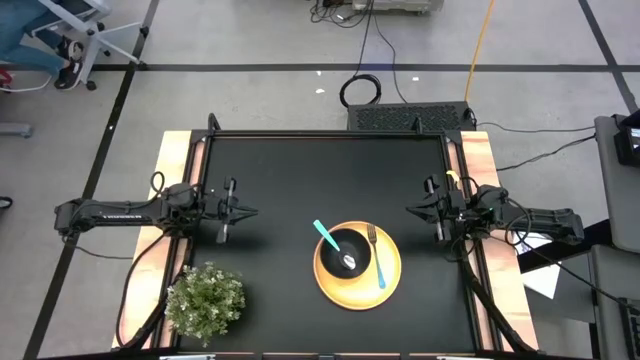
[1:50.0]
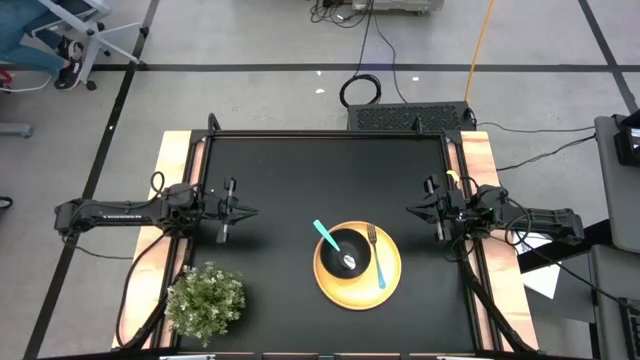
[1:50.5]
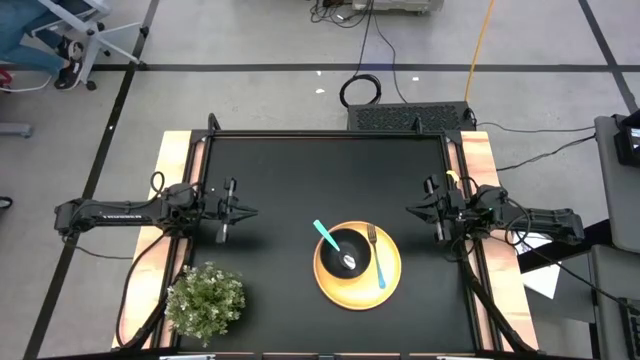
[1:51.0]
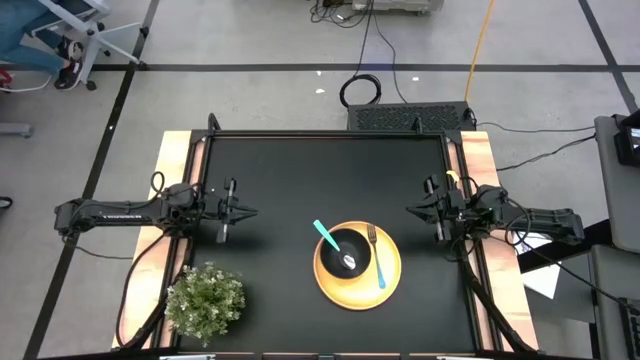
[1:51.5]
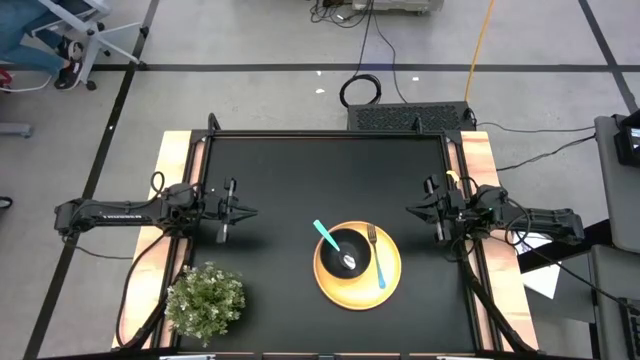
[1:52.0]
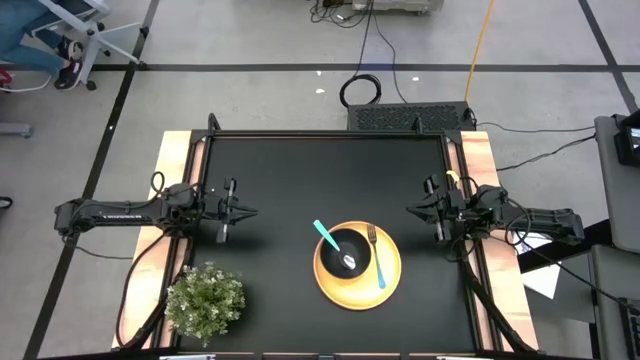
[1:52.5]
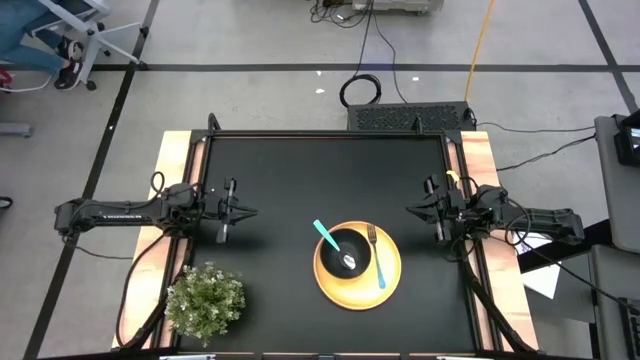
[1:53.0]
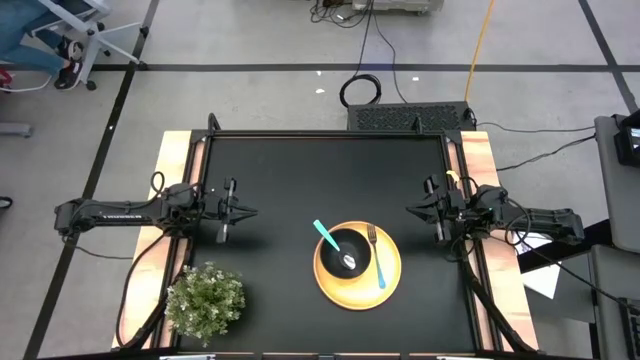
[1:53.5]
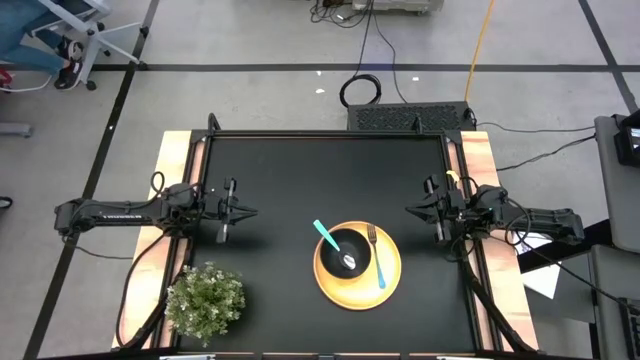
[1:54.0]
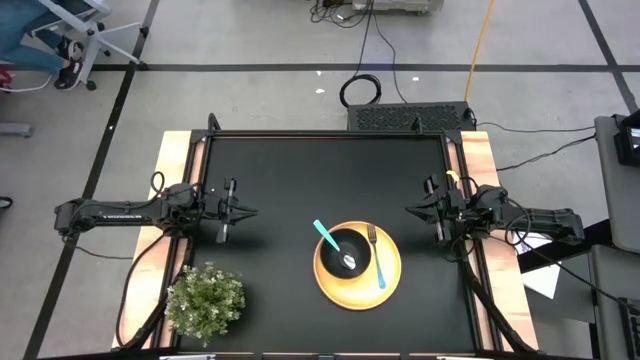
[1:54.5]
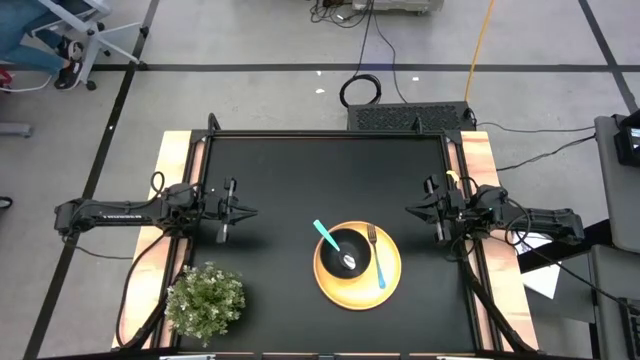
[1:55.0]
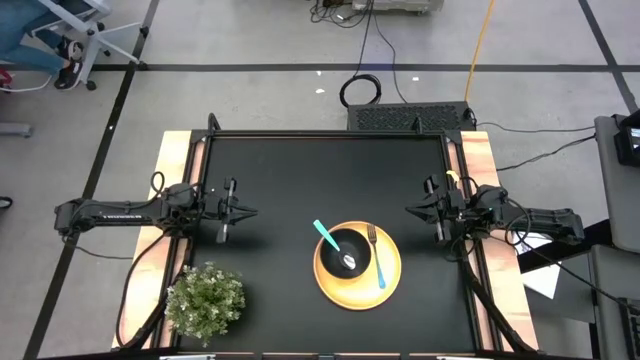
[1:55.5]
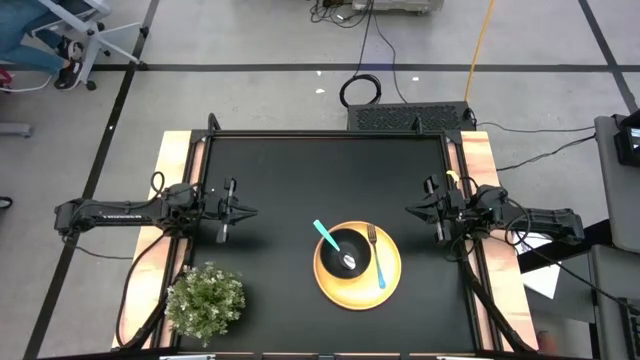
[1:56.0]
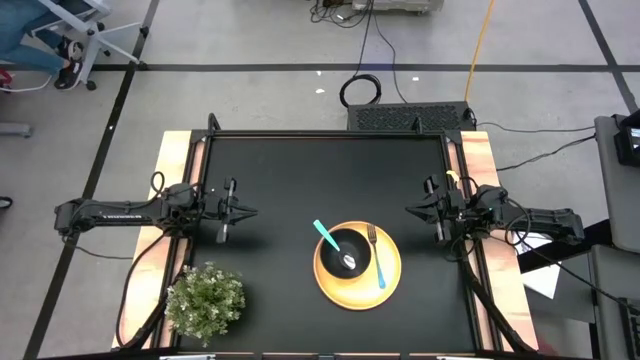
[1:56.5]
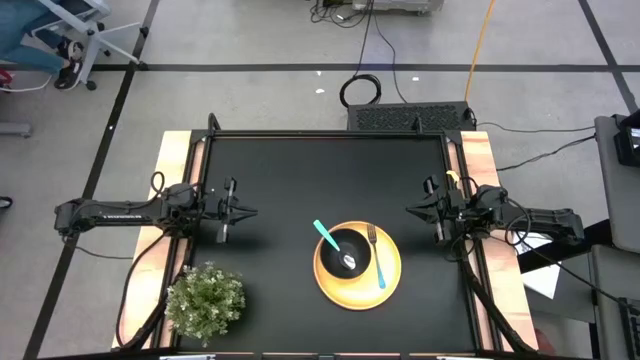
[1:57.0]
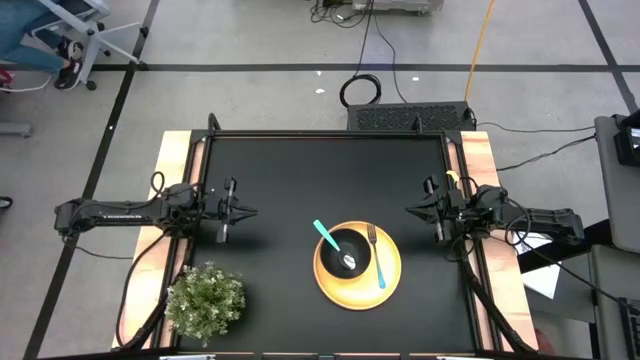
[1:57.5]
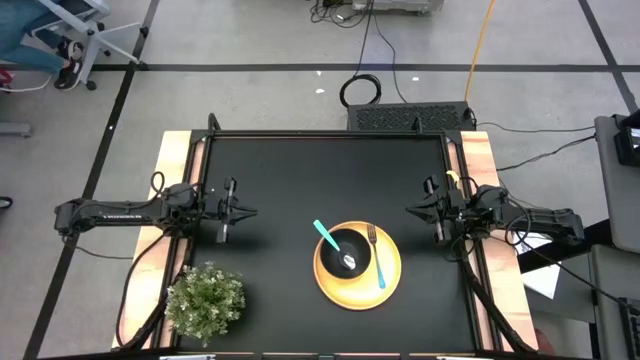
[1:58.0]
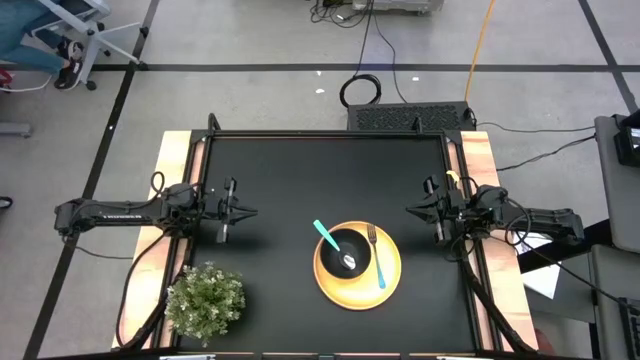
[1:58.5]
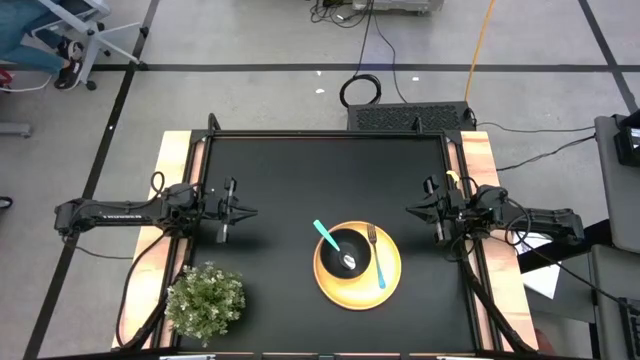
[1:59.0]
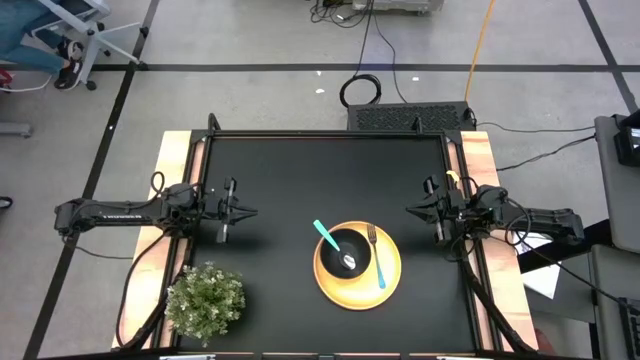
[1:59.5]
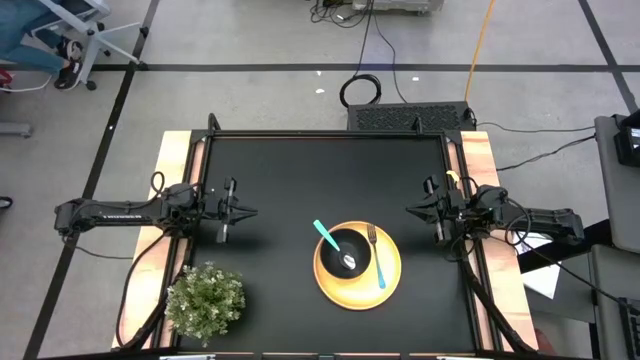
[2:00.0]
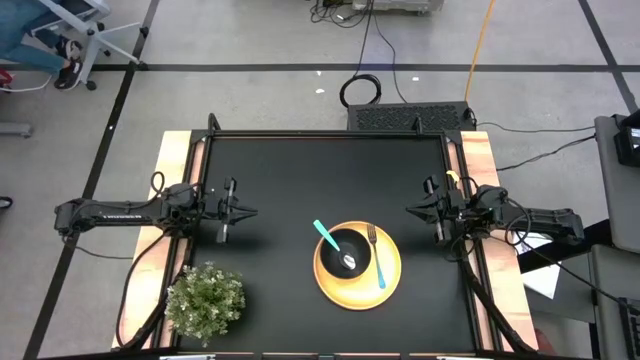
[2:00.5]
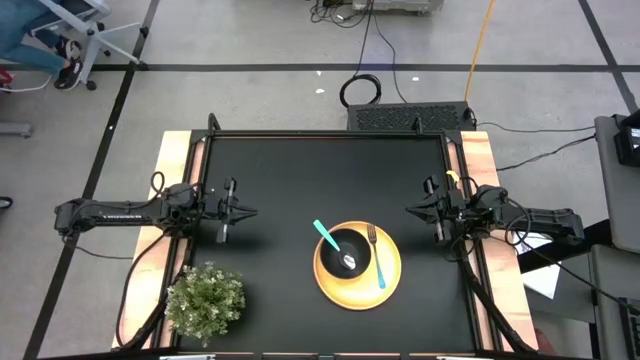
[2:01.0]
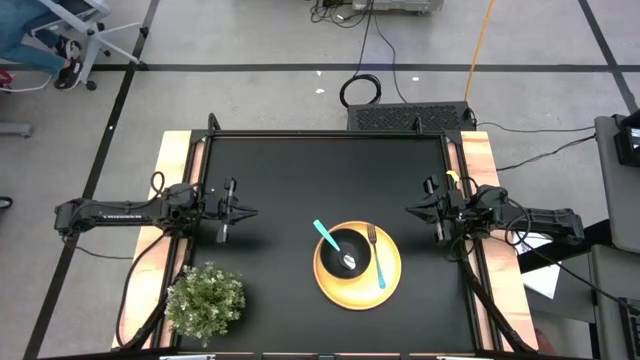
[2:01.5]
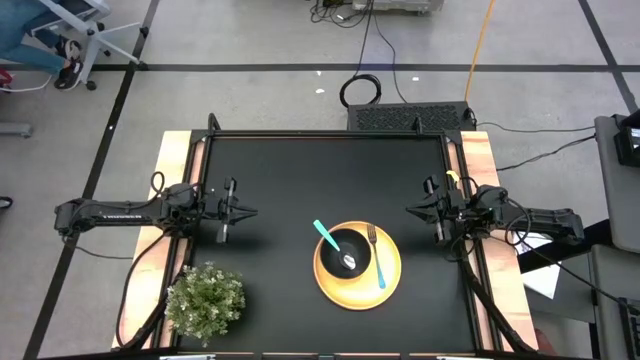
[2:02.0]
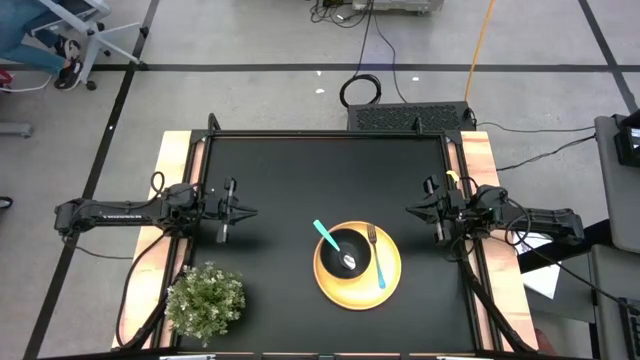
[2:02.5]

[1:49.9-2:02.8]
Task: Set table place
Return to Home Position

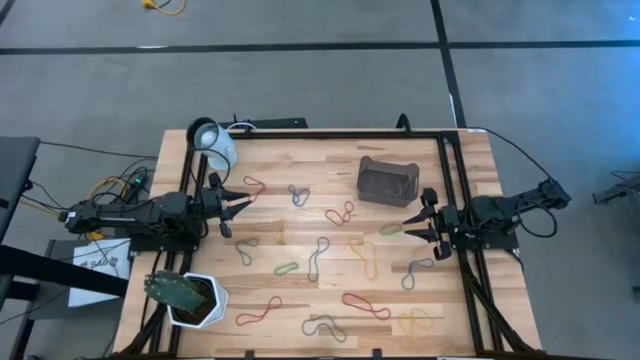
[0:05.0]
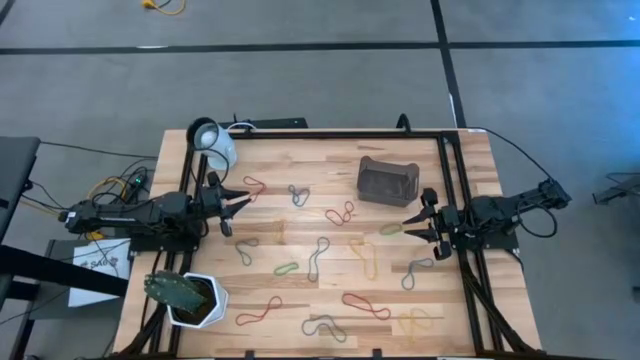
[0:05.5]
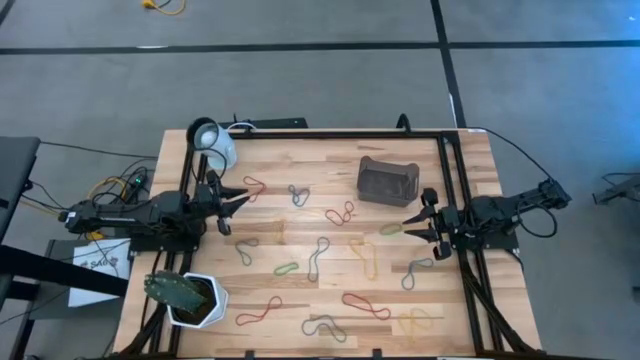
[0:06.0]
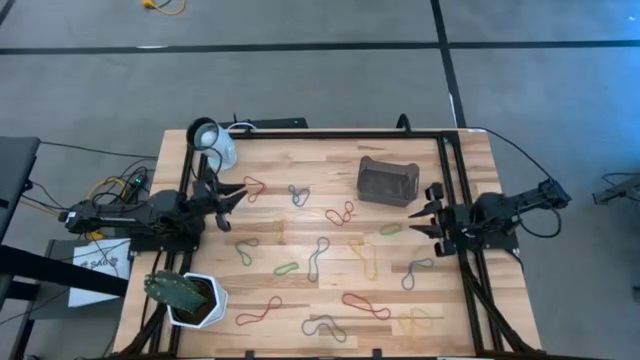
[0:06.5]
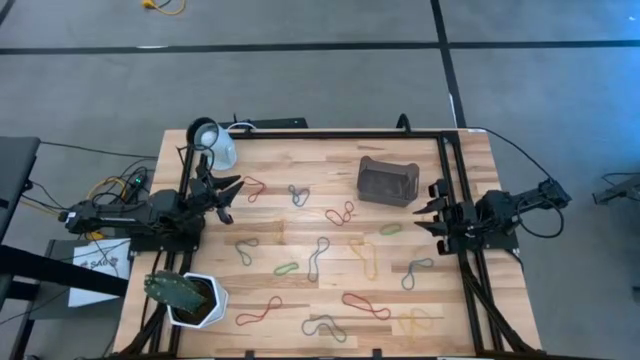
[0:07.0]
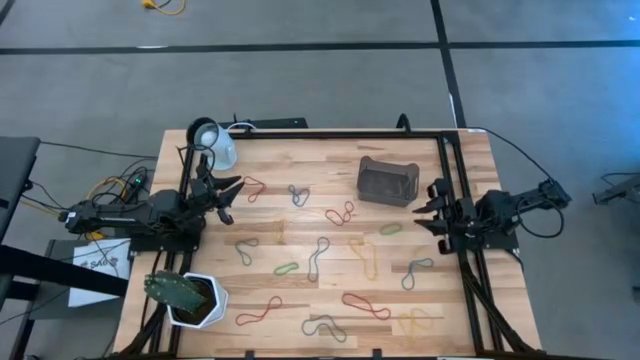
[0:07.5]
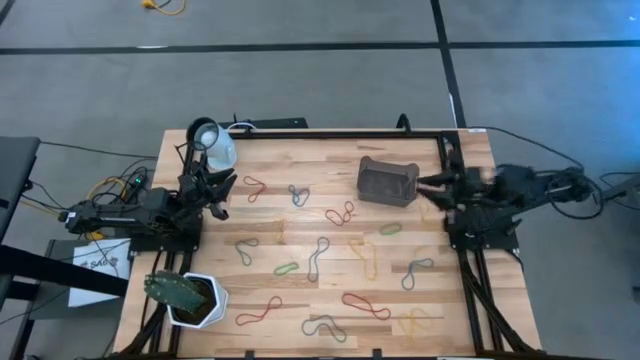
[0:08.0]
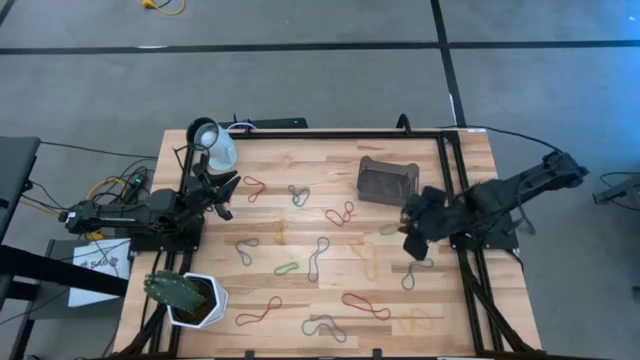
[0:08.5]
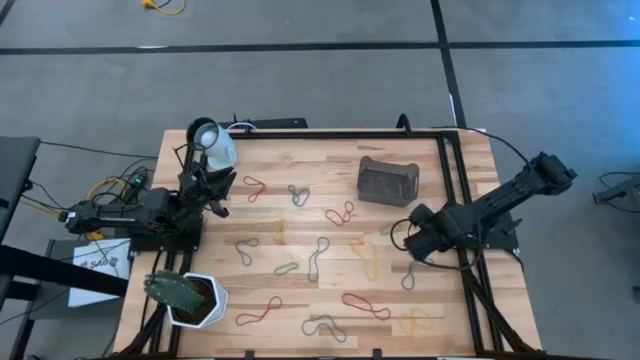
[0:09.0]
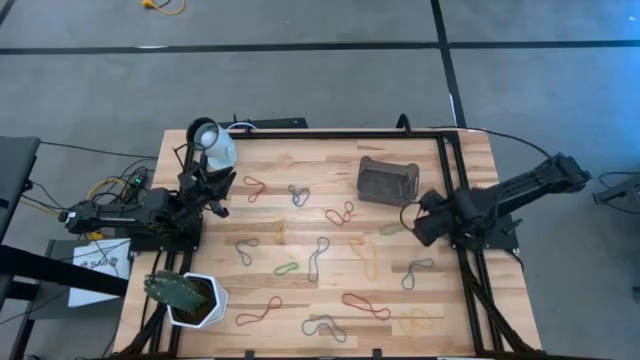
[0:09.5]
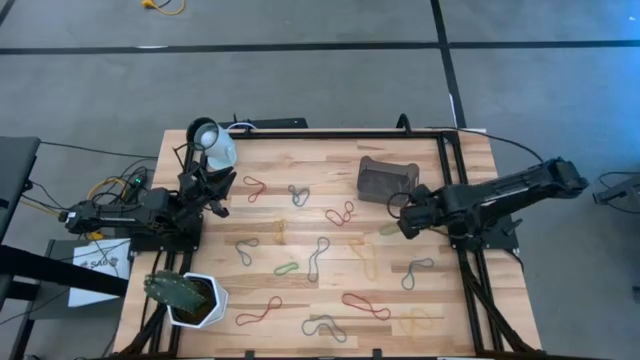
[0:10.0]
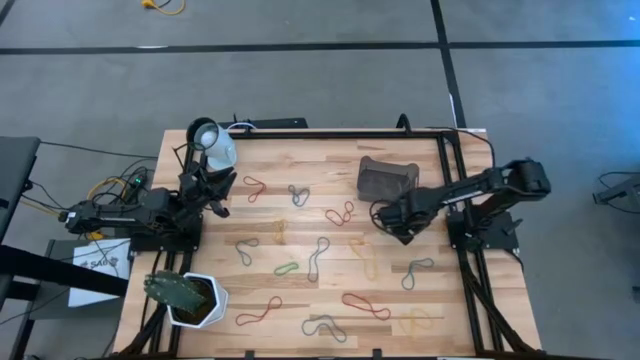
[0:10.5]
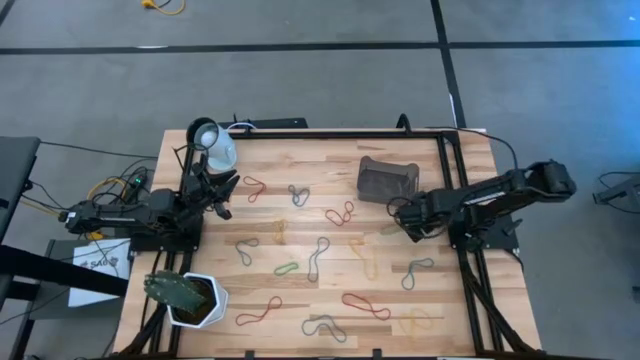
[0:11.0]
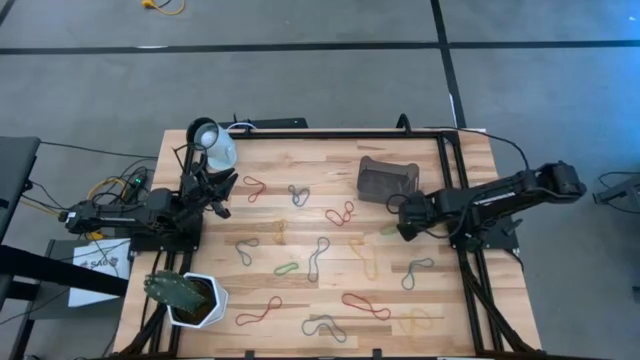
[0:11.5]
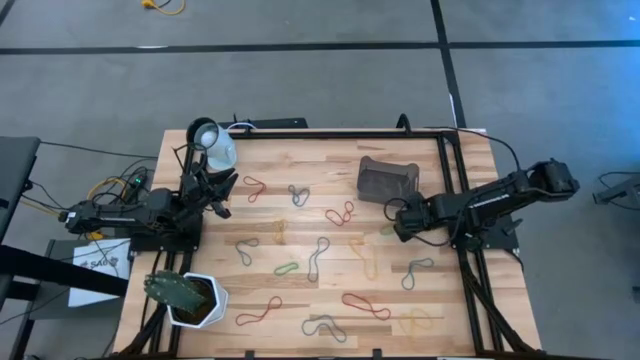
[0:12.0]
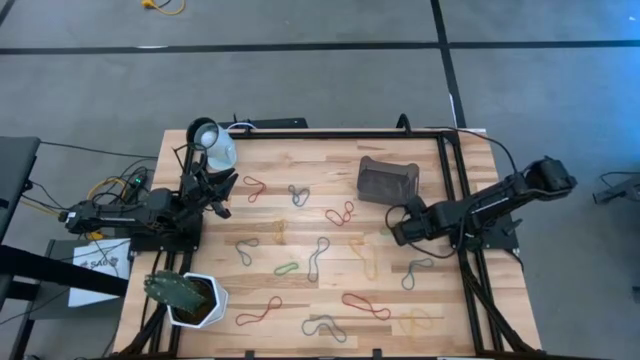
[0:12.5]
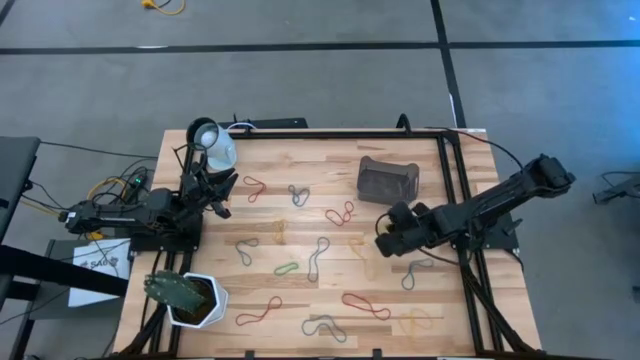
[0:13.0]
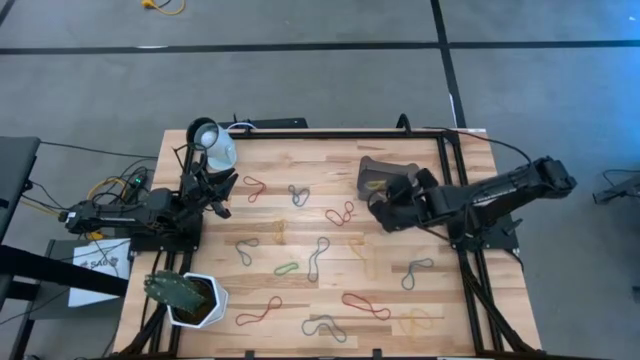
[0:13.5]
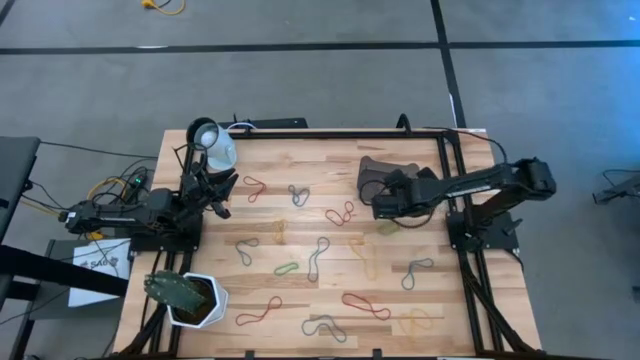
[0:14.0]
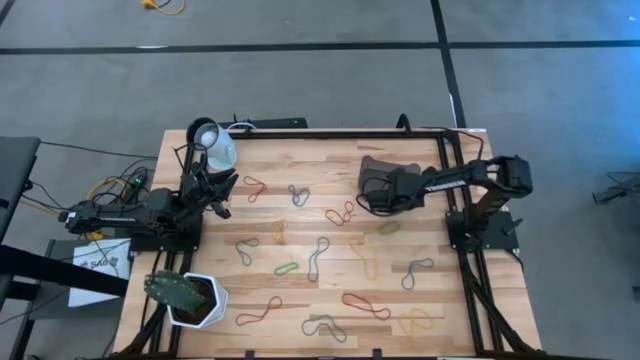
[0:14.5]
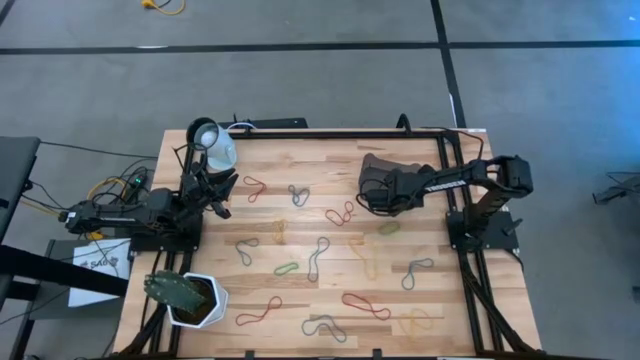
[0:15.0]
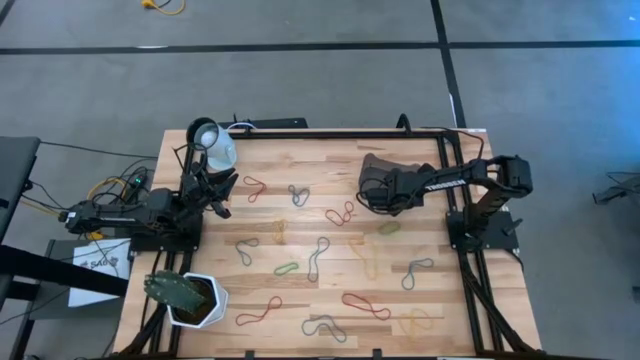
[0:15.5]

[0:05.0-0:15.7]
Task: Pick and place rubber bands into bin
Put the yellow rubber band into the black container
